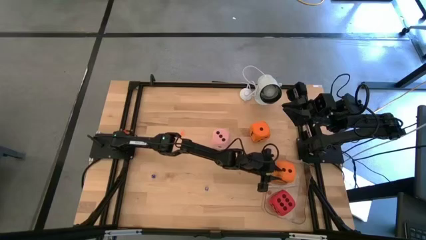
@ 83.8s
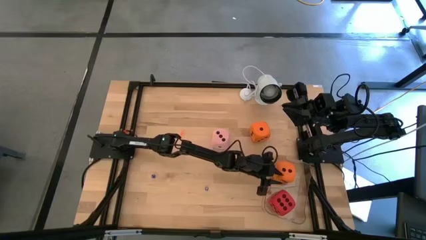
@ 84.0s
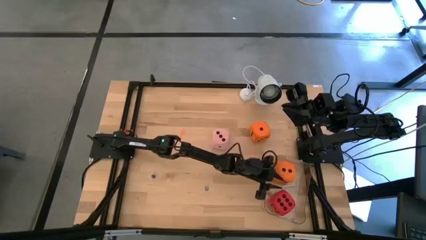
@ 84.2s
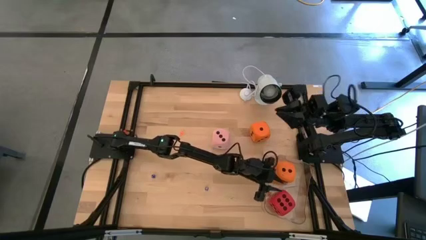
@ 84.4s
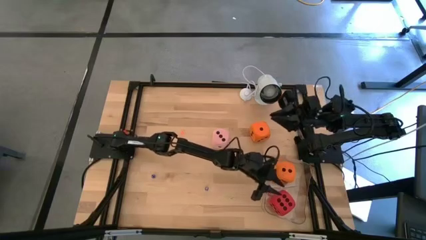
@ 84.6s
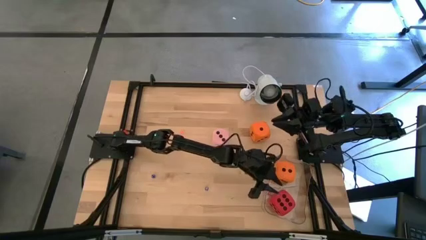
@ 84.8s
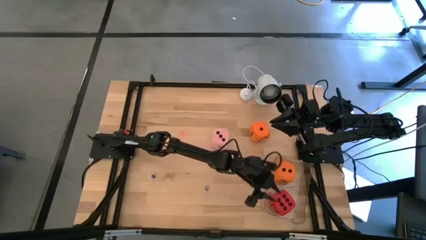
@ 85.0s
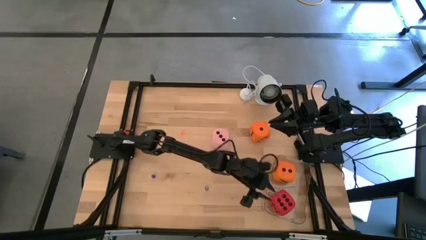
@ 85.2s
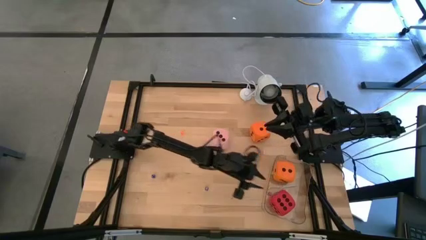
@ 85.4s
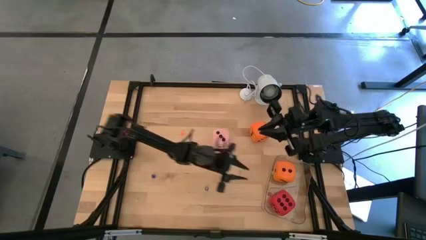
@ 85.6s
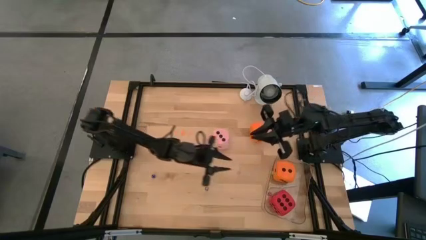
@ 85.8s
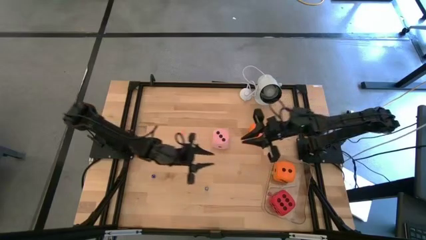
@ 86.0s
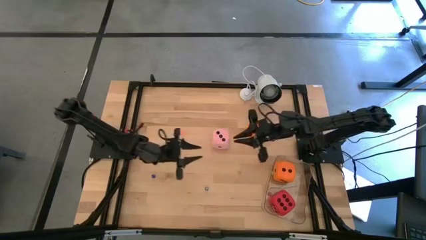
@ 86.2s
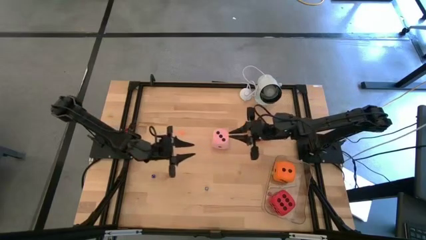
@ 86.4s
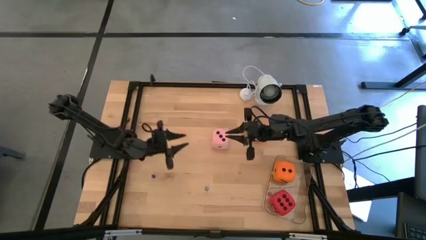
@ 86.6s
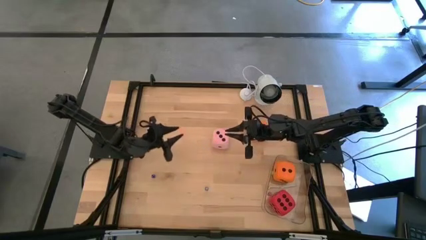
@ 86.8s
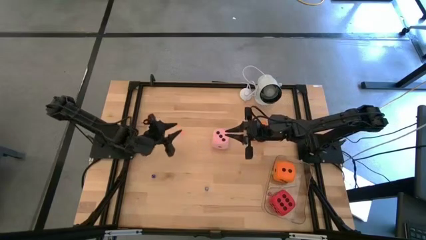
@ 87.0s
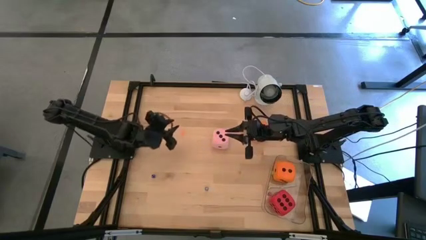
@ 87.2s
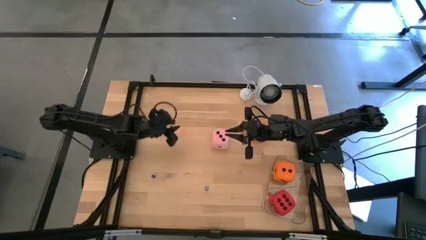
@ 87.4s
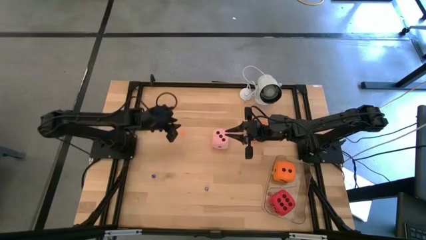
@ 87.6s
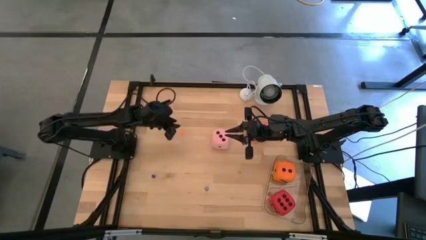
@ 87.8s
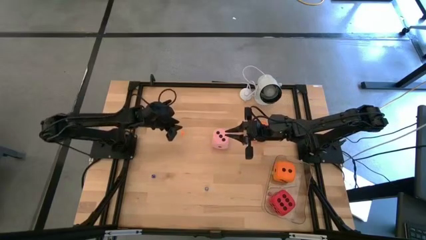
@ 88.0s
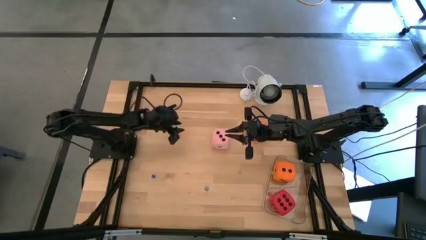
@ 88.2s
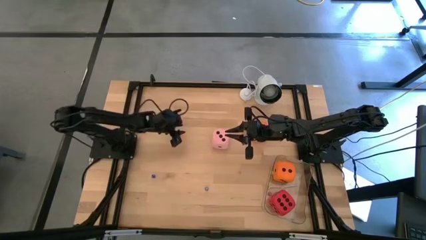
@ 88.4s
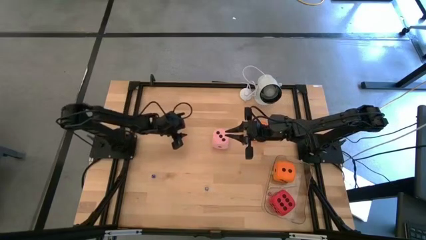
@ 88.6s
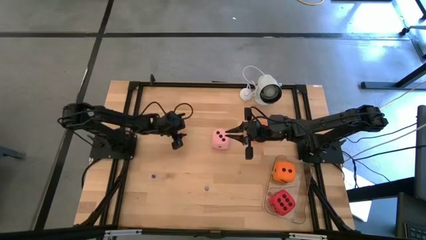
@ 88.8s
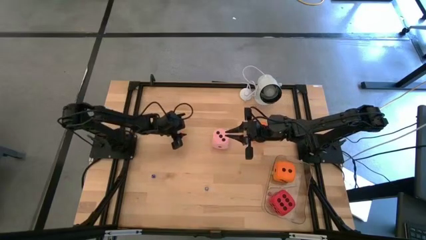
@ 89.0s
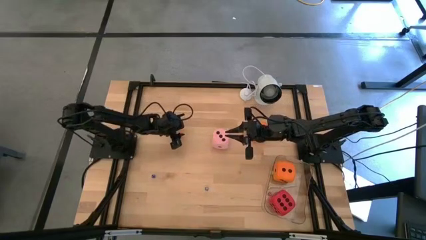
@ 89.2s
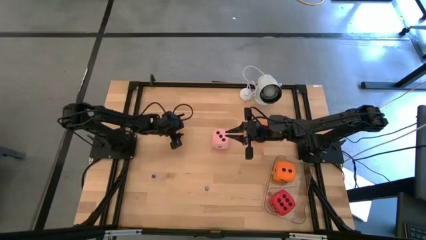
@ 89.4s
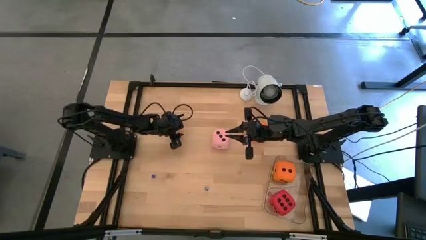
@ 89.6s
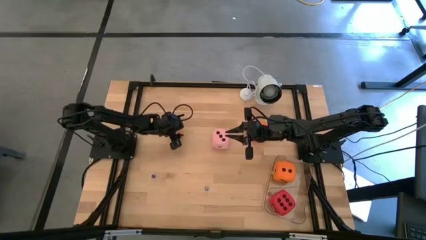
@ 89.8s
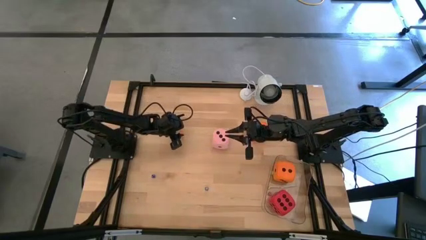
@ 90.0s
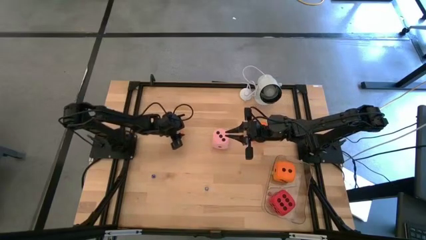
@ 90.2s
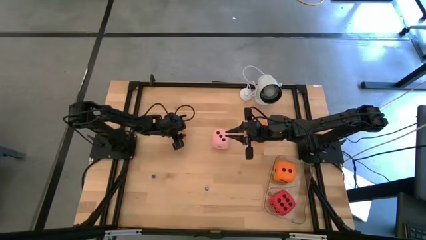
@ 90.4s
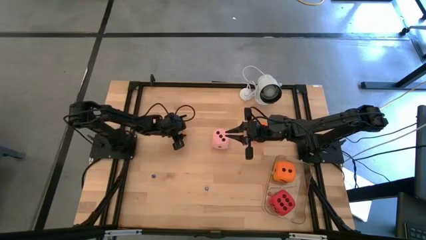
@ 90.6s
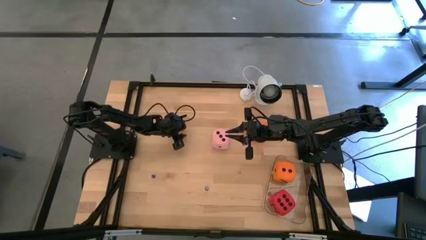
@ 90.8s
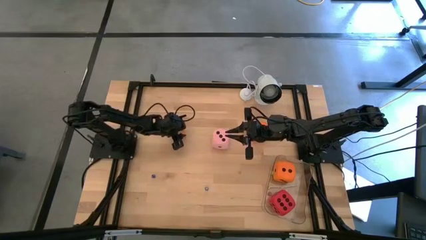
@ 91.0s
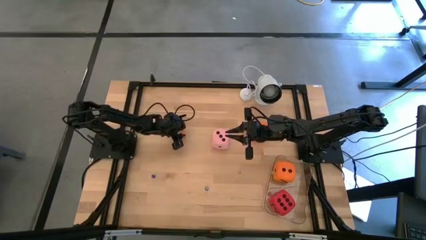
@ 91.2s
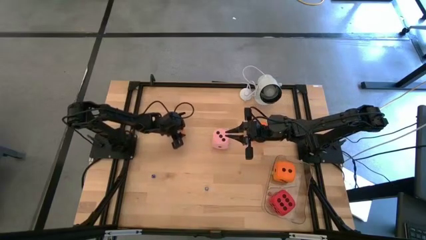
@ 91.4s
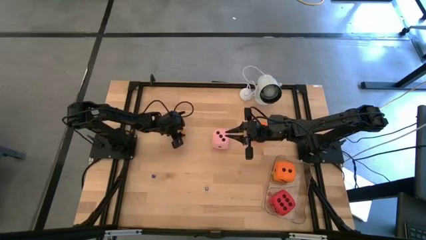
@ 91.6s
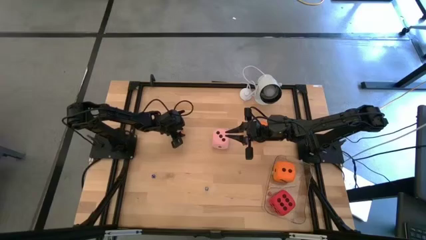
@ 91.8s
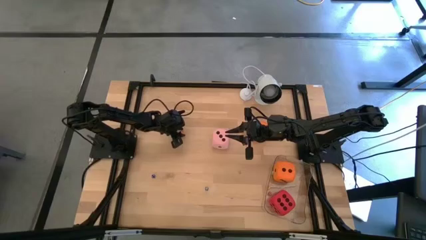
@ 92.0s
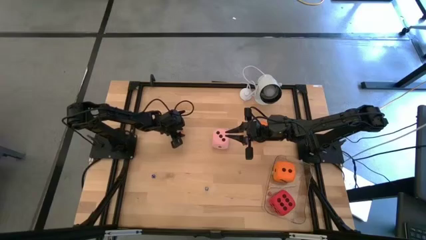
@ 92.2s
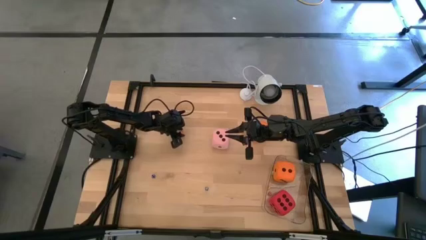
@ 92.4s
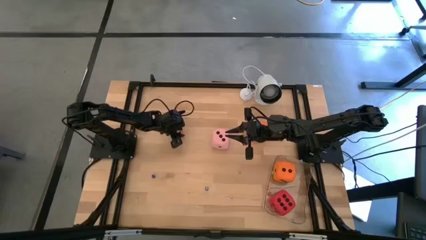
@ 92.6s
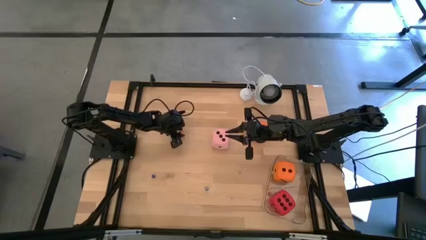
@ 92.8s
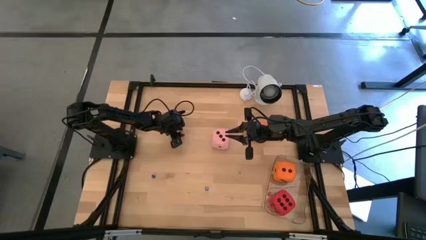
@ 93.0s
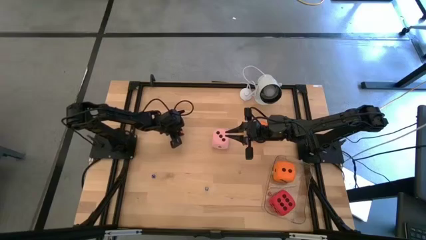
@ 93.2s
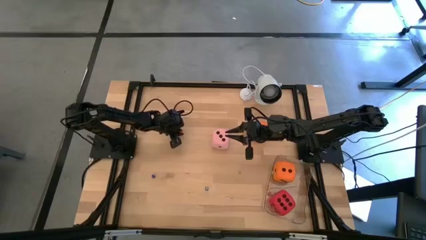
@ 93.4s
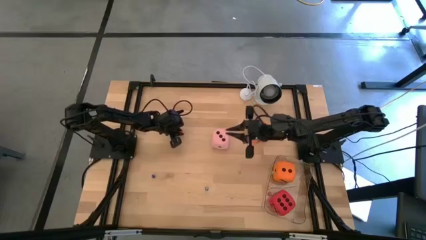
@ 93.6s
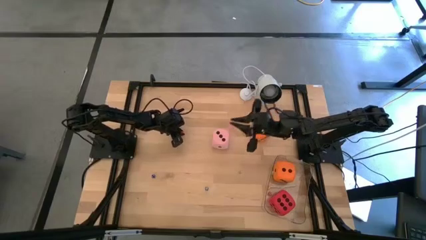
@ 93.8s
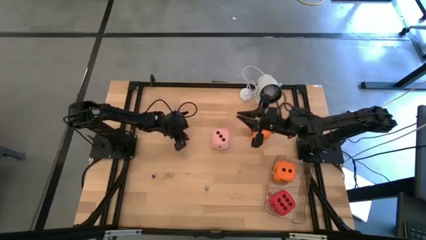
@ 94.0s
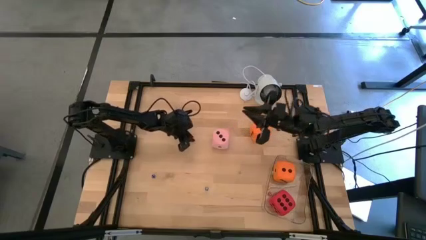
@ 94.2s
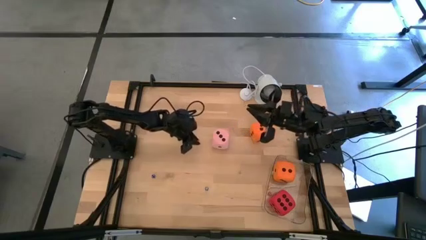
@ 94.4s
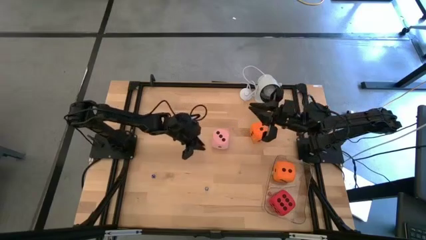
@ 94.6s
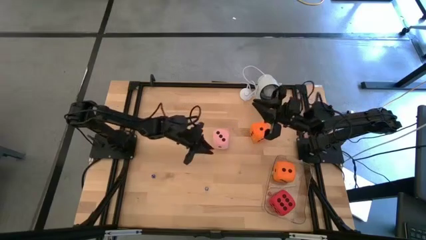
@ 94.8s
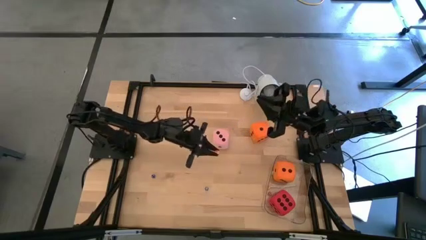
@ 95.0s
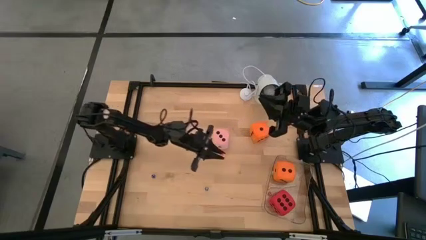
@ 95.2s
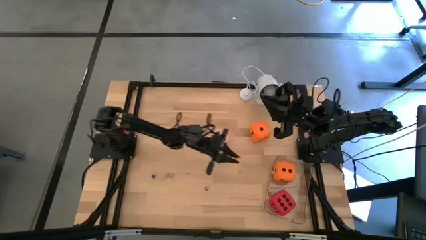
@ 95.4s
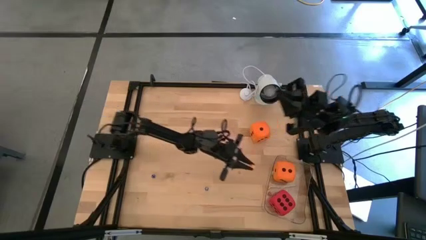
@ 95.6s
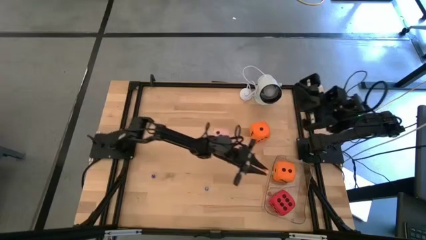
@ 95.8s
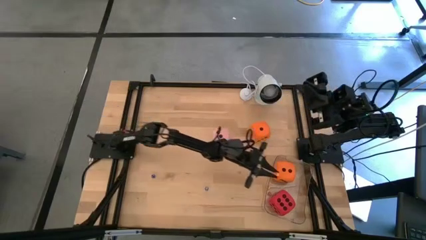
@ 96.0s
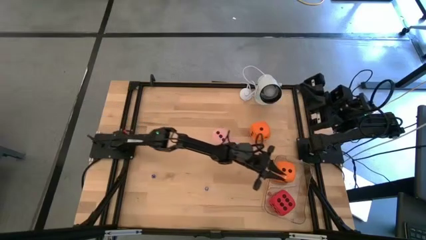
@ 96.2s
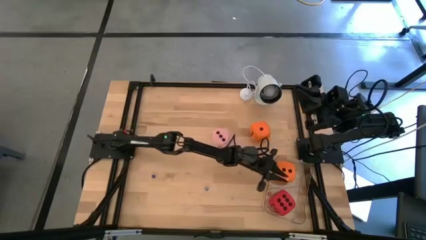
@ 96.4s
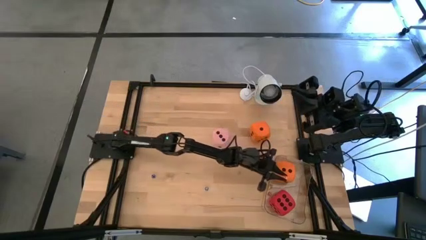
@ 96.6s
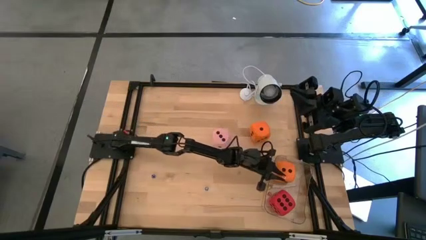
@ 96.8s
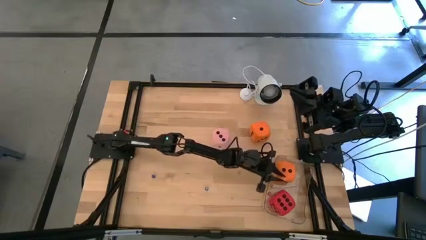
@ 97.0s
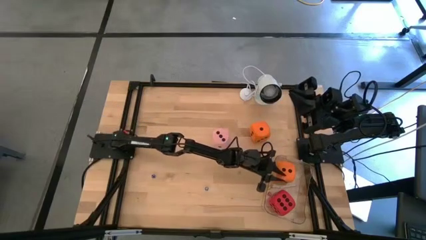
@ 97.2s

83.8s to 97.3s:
Task: Pick & Place Dice
Put the small orange die into the transparent container
